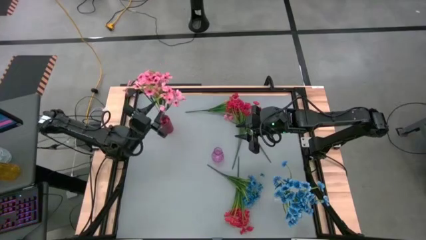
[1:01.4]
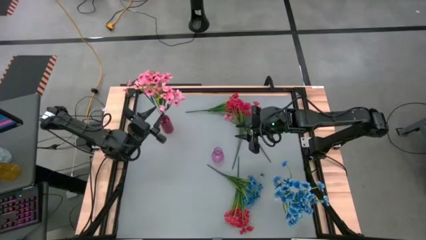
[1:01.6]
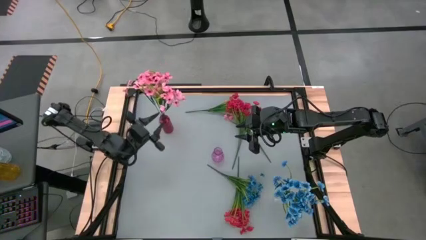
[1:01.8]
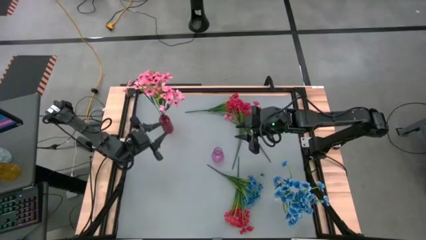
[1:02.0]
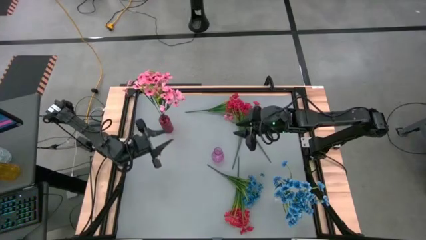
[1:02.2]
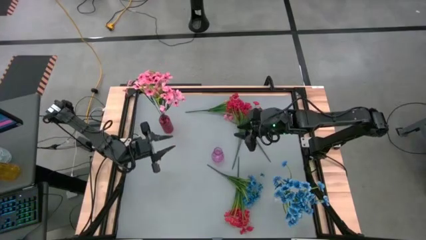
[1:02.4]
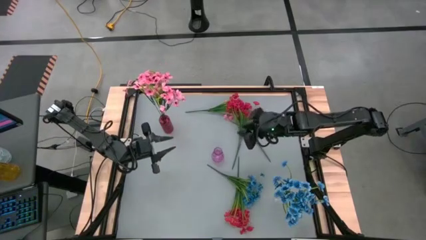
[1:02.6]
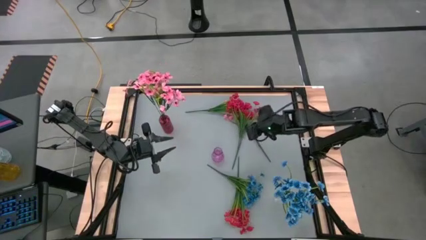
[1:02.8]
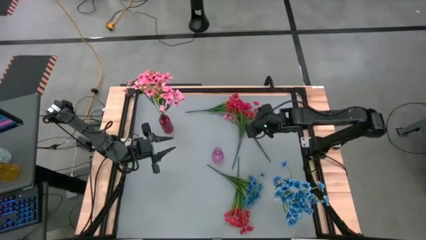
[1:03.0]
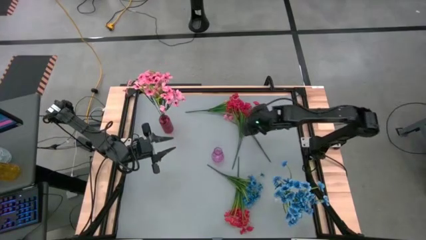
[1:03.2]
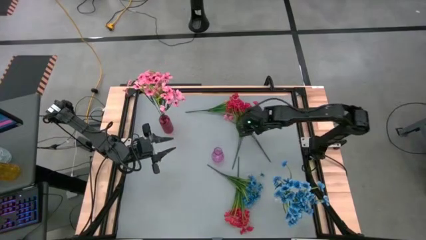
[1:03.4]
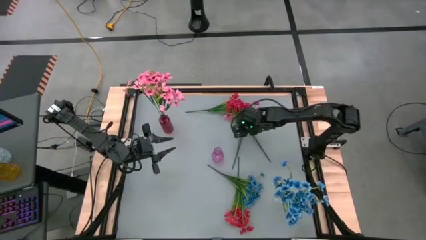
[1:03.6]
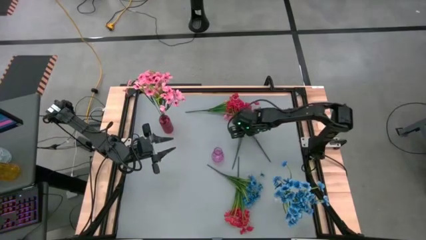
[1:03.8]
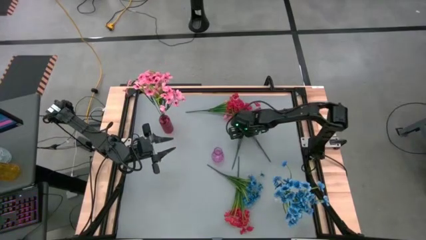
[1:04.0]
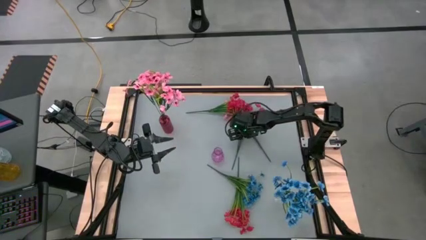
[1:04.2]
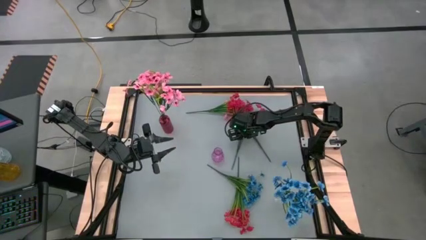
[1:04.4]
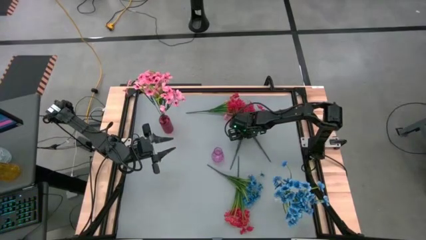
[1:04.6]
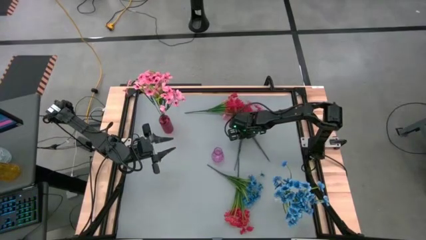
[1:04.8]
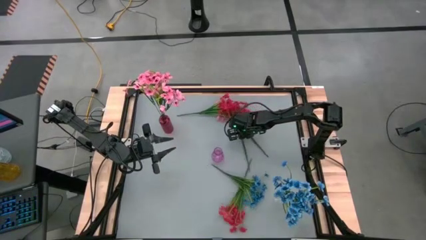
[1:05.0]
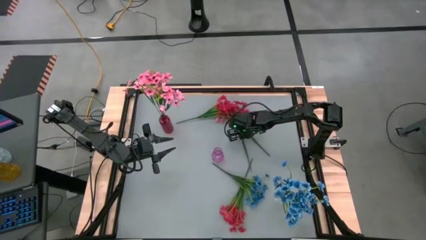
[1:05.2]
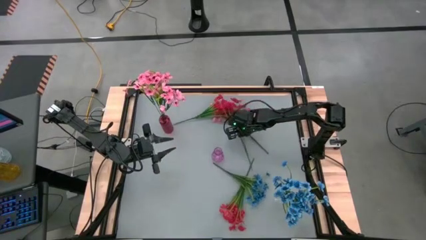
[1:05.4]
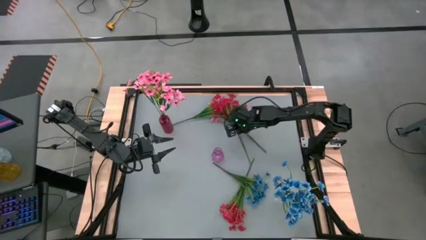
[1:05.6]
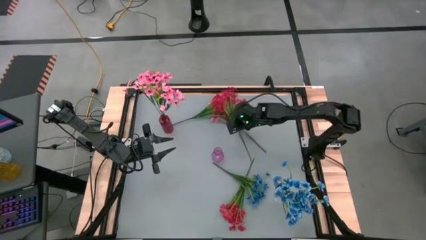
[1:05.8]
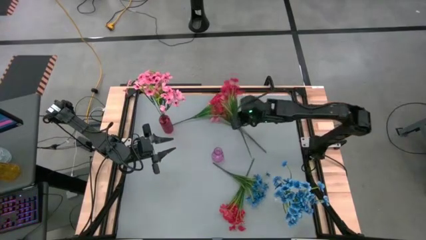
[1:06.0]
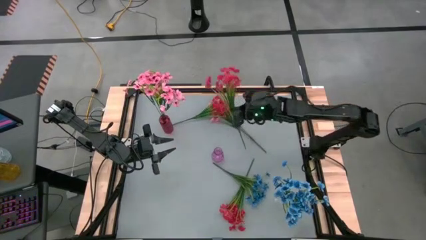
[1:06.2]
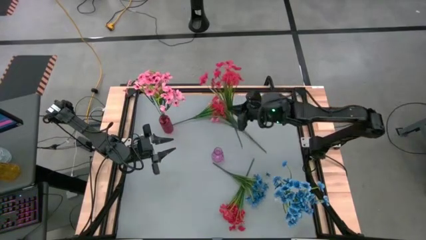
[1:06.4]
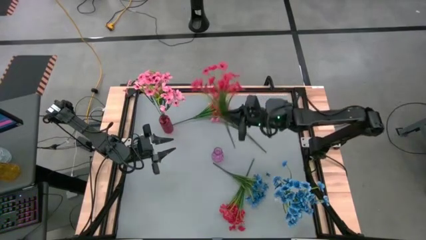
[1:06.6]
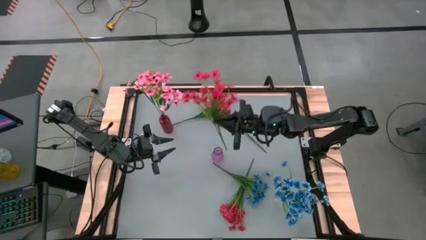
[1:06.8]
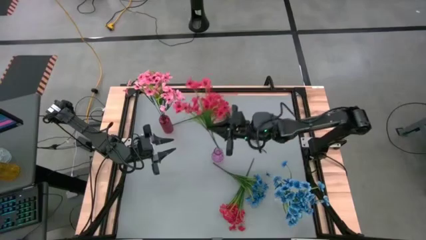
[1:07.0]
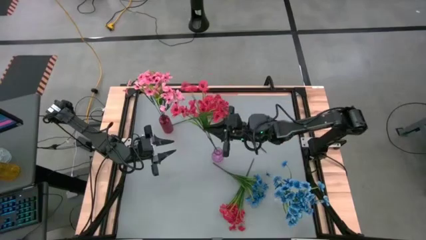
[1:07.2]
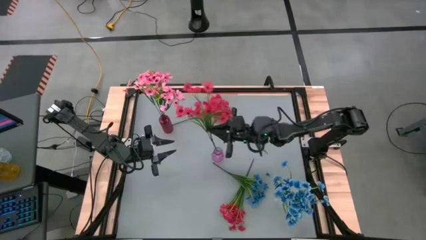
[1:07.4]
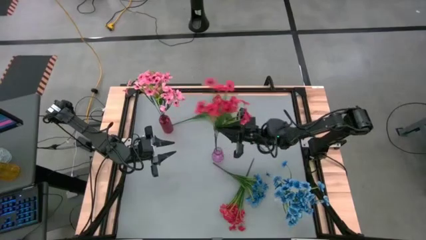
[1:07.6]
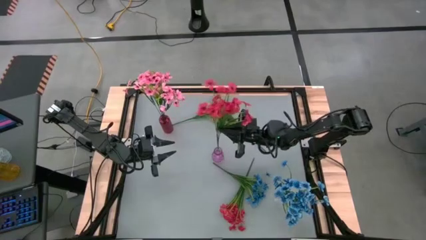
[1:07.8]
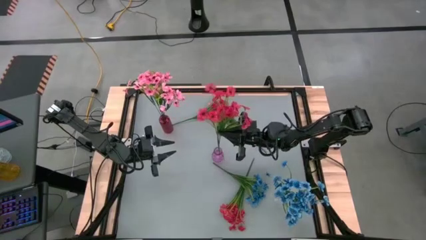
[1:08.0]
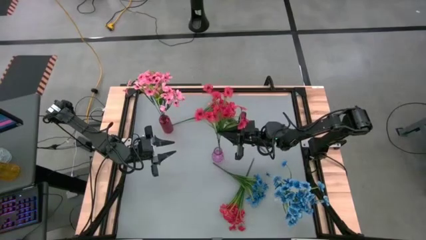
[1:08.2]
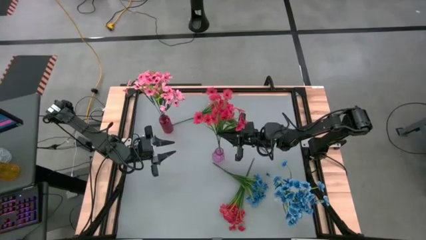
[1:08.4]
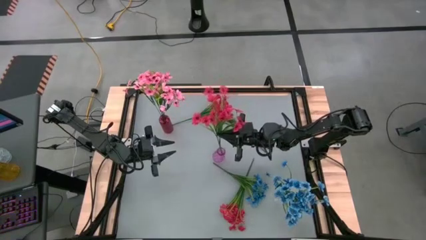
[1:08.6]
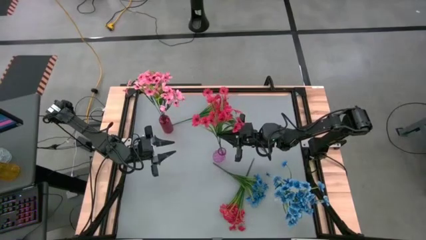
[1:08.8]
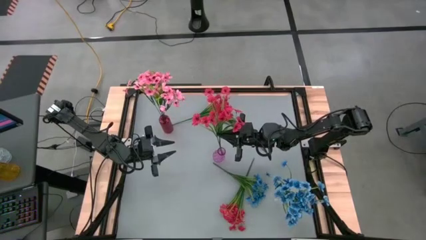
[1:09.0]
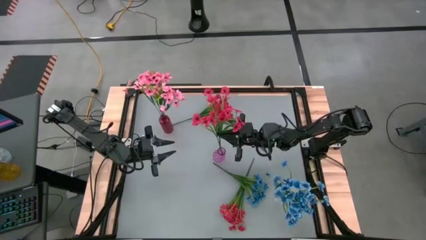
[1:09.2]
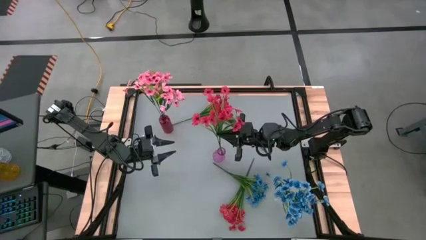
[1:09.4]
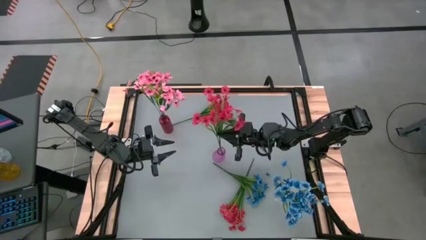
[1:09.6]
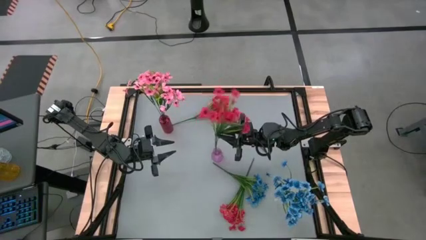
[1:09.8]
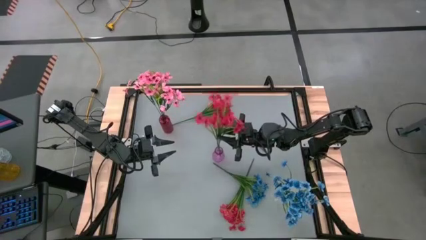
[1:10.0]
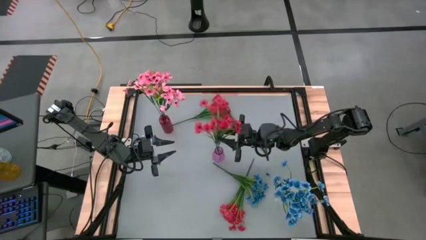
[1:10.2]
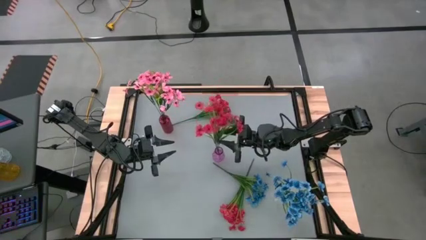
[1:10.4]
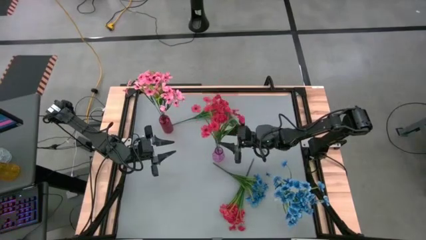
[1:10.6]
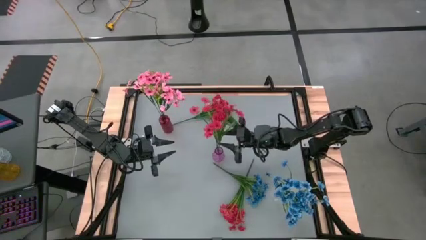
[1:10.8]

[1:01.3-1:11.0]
Task: Sort flowers into vase by color
Put the middle red flowers into the purple vase

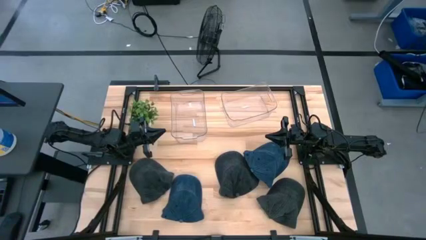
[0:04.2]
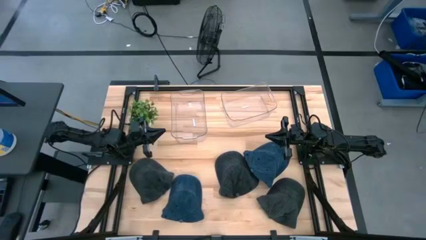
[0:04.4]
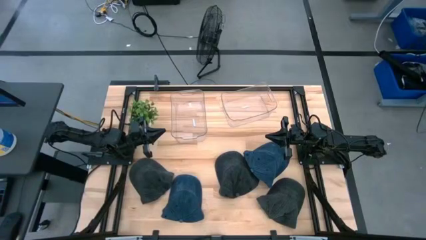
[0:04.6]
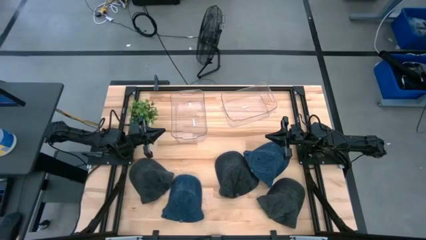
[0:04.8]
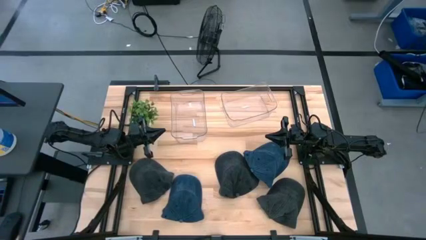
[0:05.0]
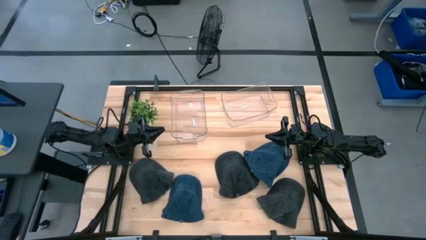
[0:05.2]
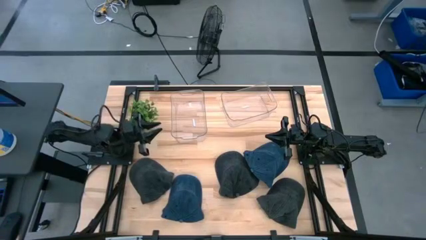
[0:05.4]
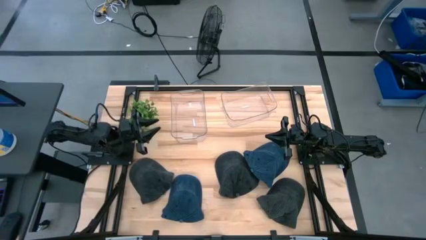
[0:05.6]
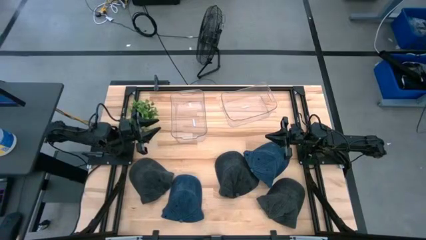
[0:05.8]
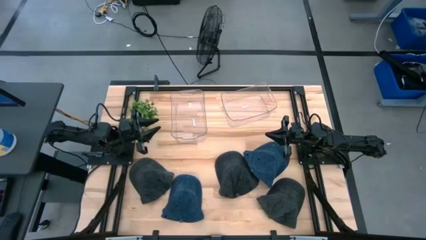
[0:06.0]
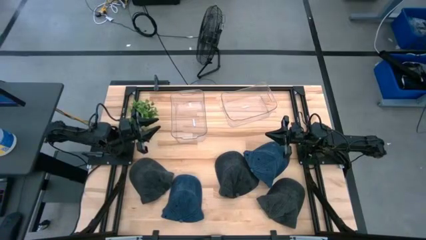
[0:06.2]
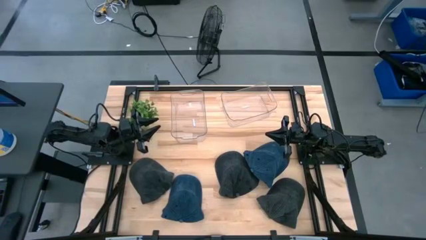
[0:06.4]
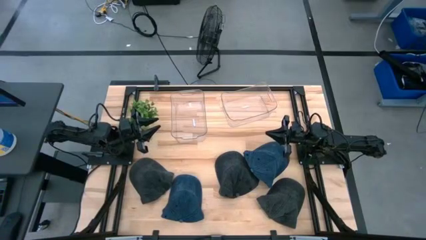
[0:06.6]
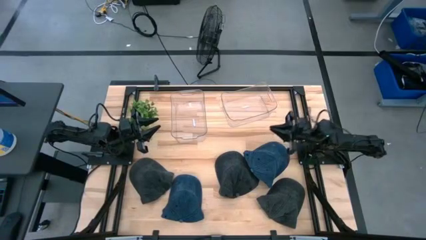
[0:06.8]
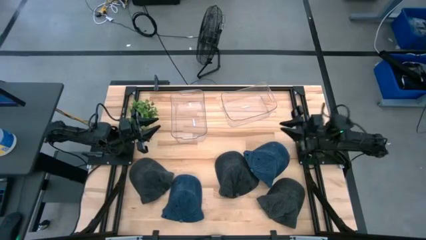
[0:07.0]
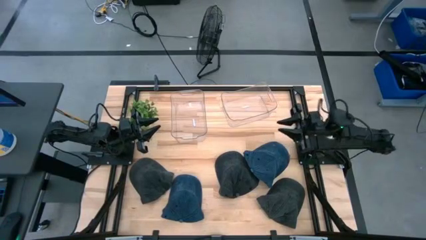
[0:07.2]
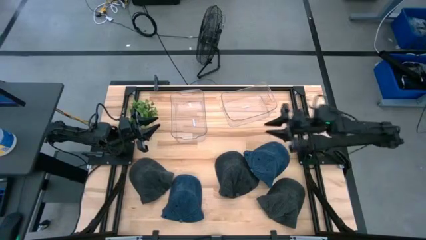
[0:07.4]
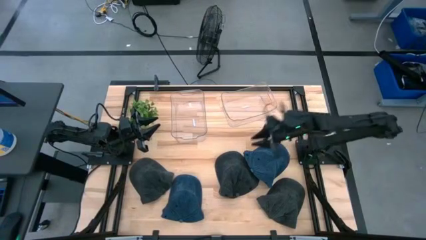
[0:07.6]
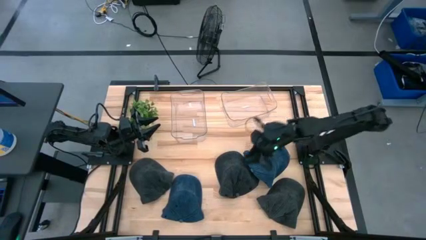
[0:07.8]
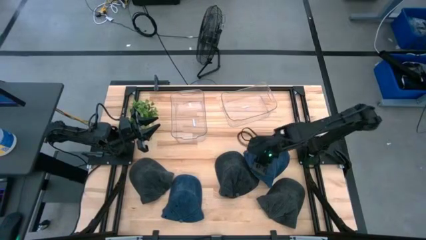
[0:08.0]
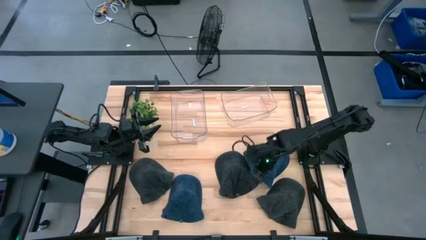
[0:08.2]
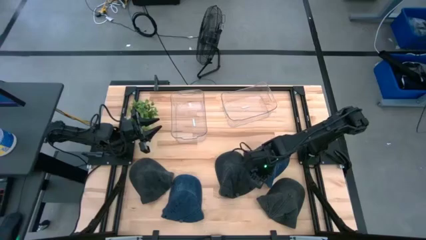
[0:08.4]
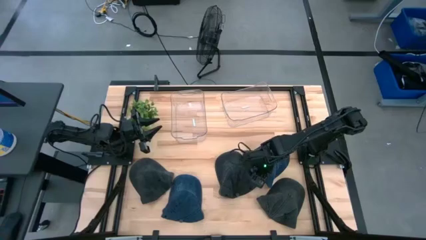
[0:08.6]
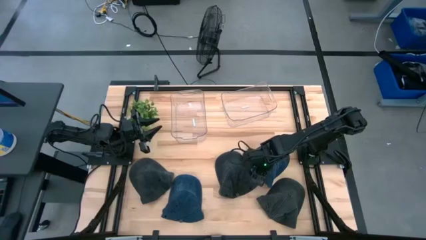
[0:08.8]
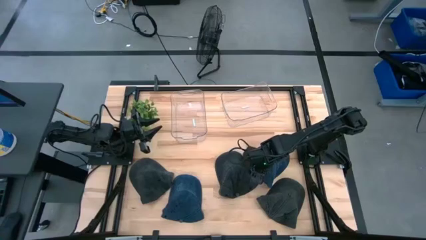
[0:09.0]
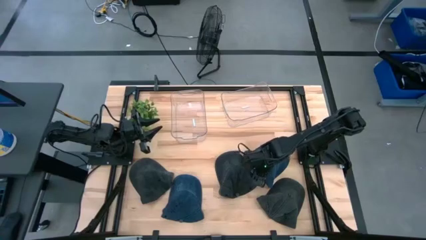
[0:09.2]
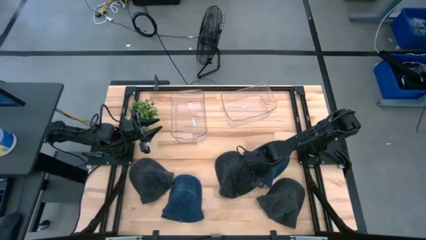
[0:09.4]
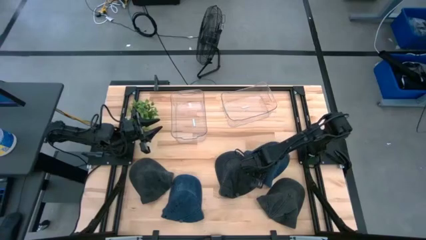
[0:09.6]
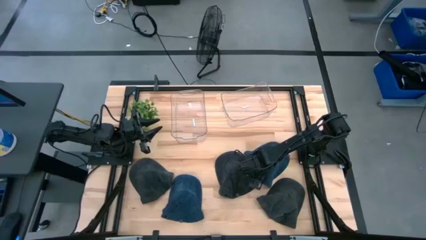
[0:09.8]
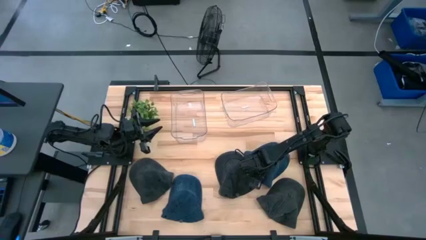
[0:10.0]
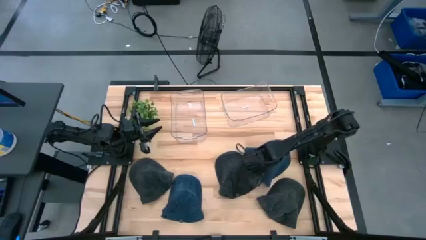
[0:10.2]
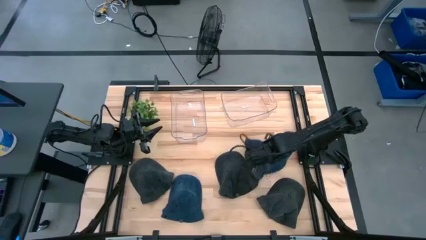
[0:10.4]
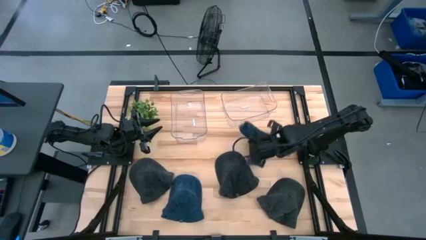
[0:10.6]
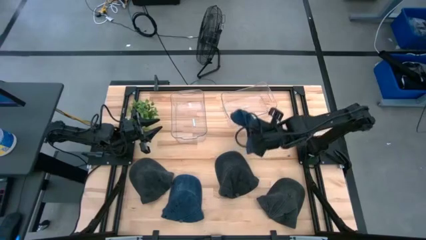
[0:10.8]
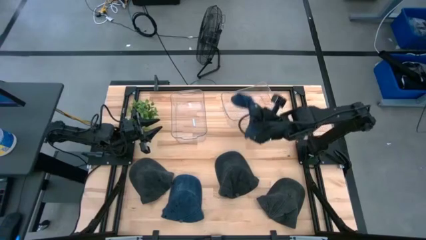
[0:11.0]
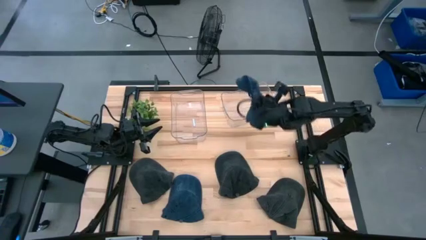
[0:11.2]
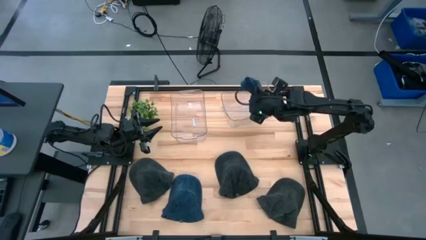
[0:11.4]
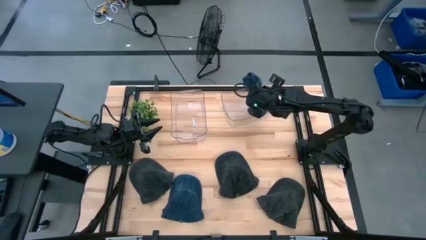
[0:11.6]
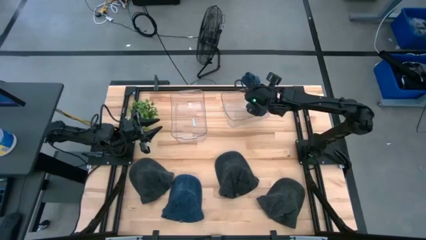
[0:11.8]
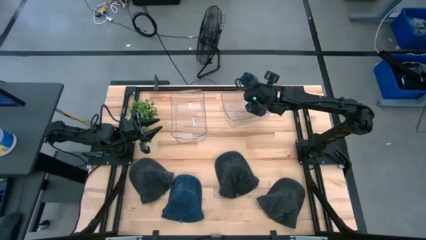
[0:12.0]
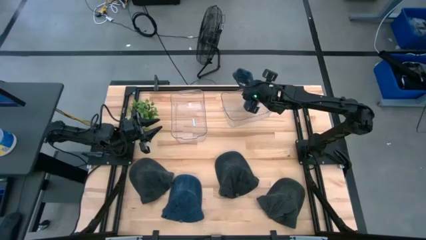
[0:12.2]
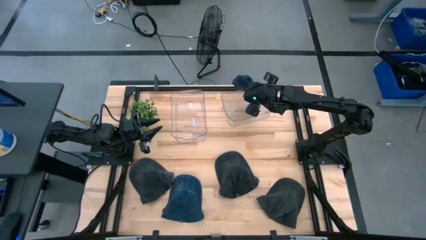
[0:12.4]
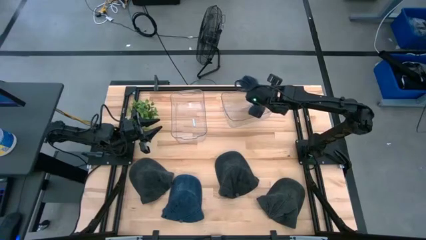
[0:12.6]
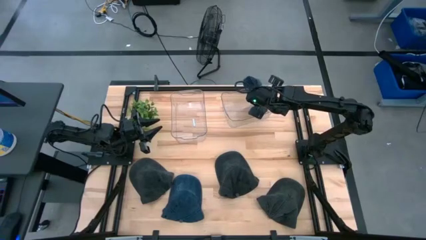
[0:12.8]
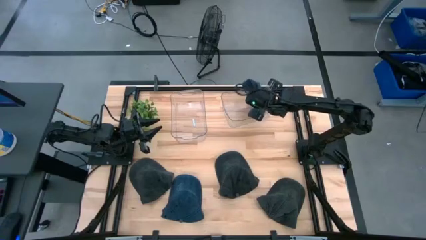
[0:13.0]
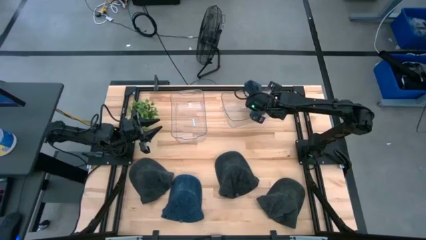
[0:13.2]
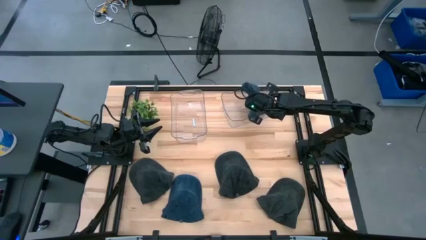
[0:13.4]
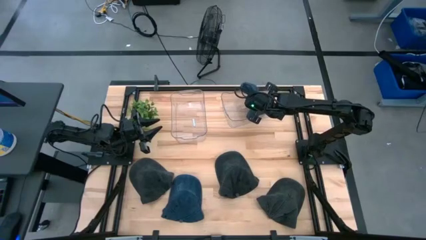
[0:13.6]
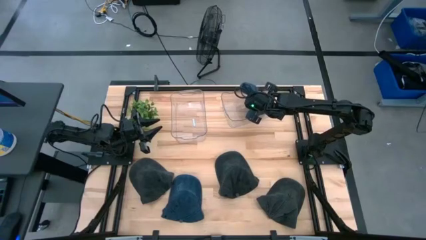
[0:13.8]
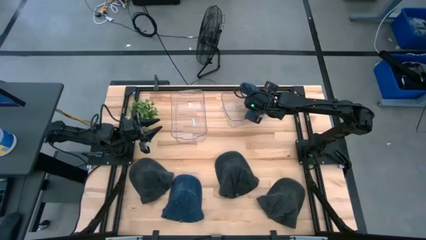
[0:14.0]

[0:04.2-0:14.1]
Task: Pick & Place hat
Put the top blue cap into the right transparent bin
